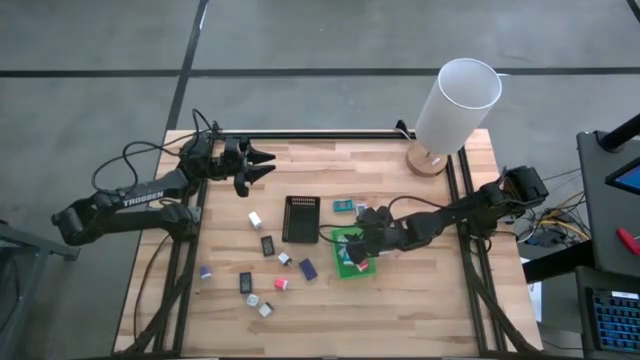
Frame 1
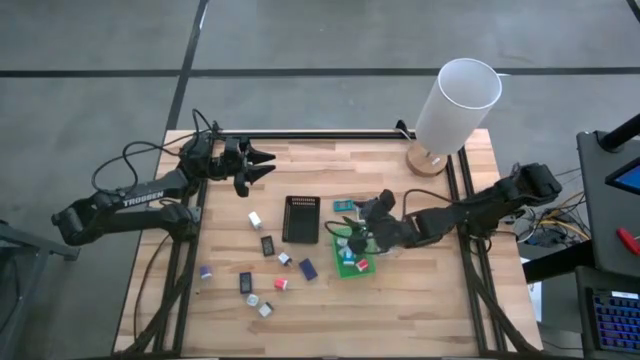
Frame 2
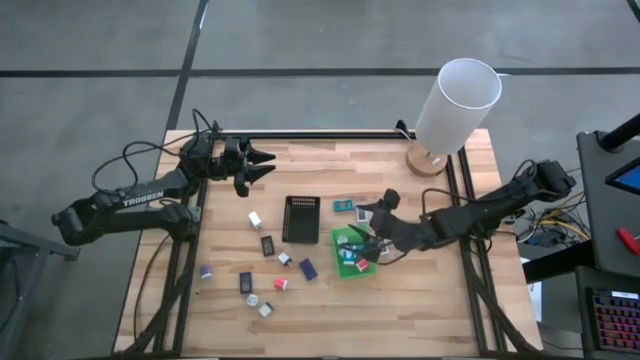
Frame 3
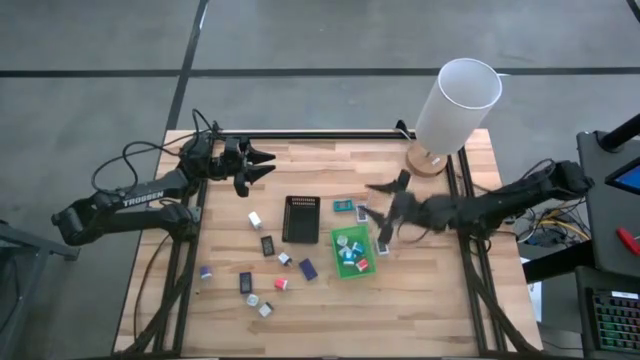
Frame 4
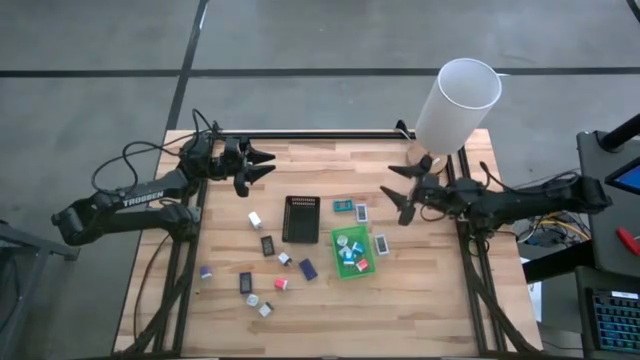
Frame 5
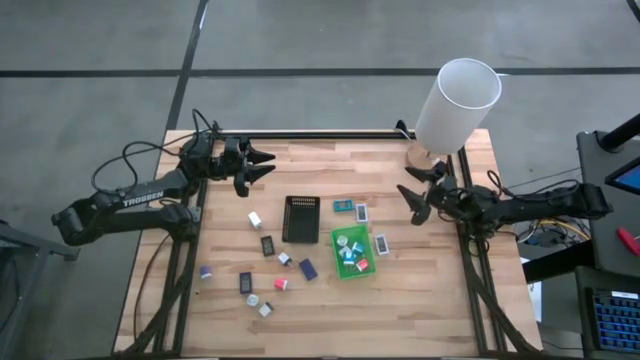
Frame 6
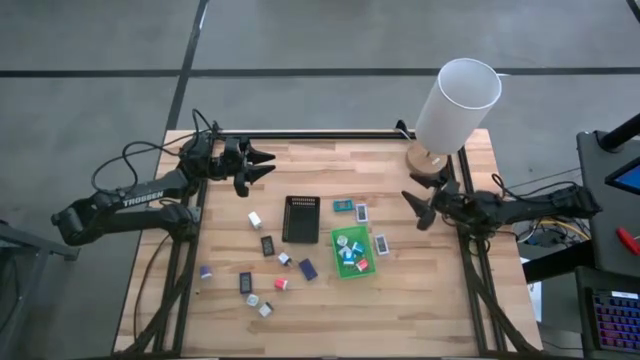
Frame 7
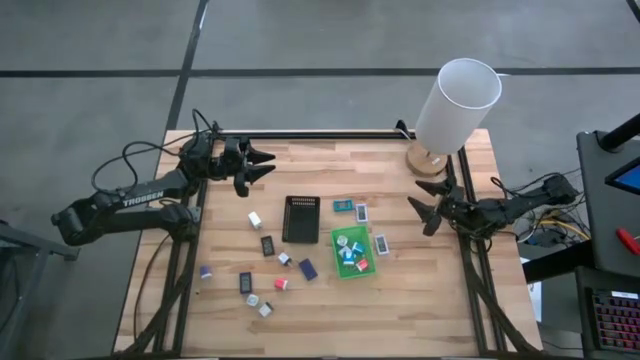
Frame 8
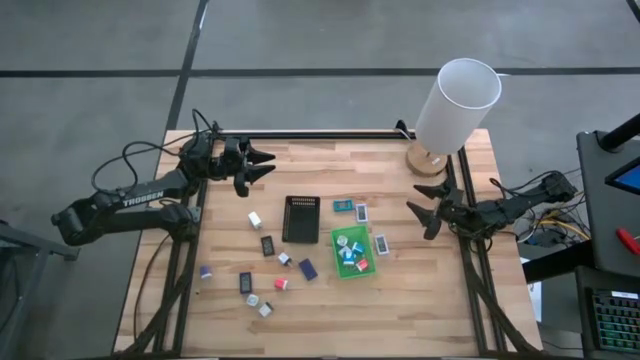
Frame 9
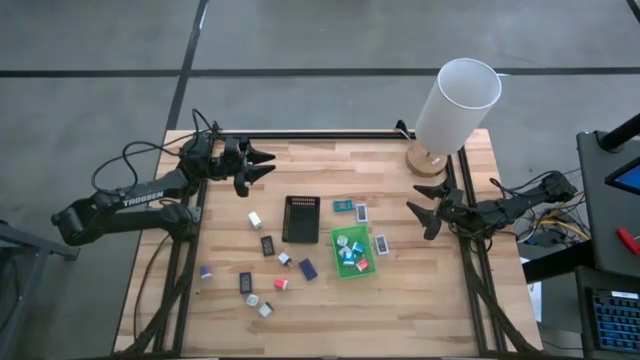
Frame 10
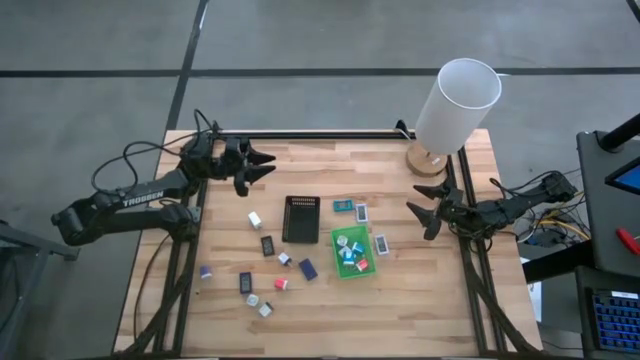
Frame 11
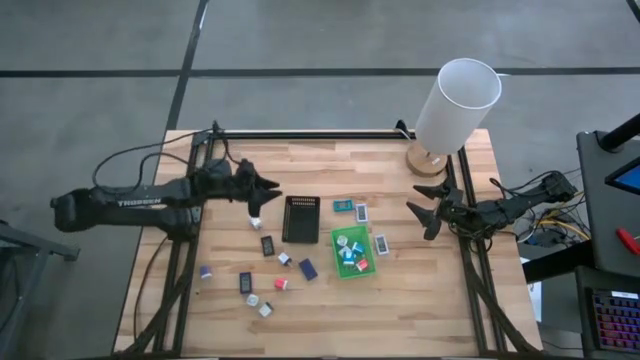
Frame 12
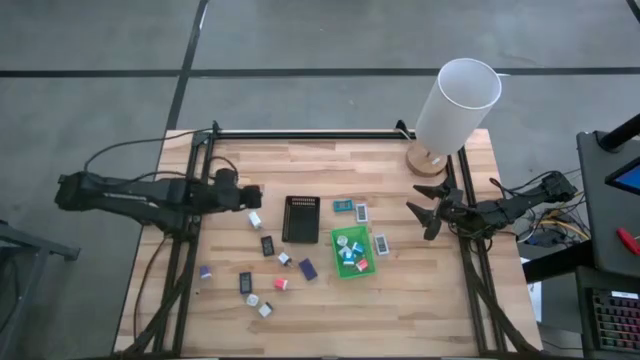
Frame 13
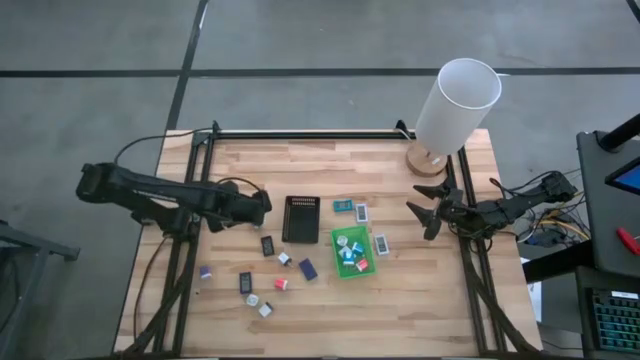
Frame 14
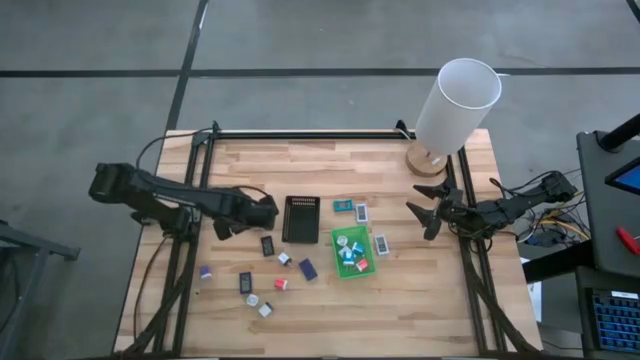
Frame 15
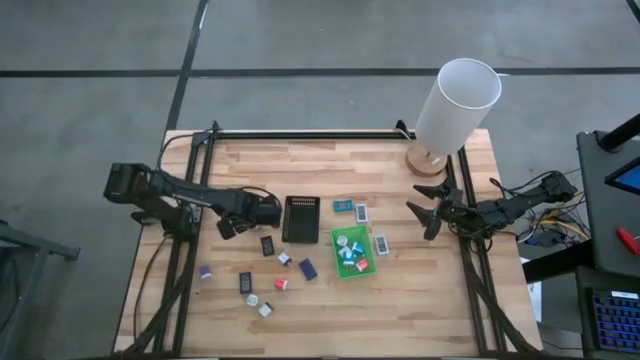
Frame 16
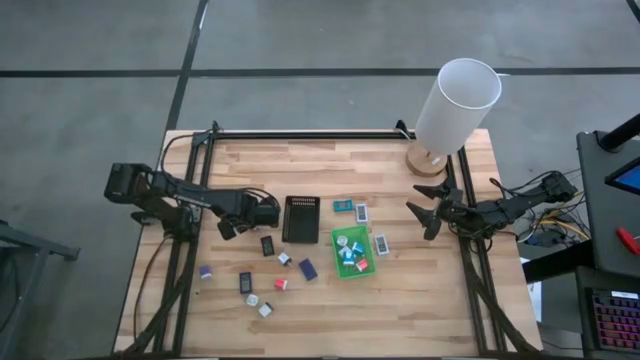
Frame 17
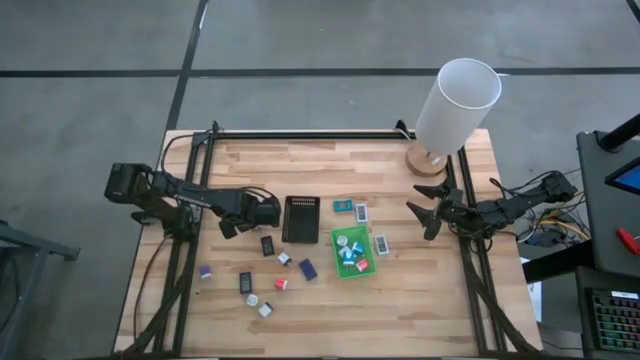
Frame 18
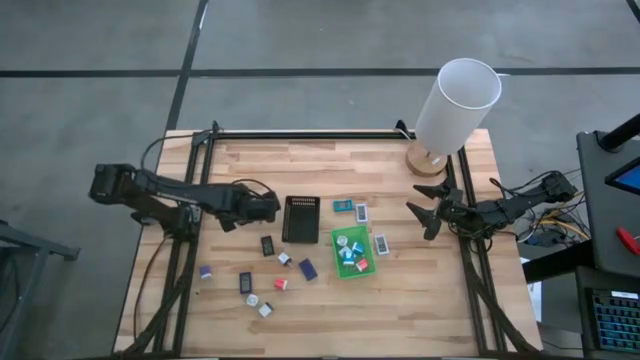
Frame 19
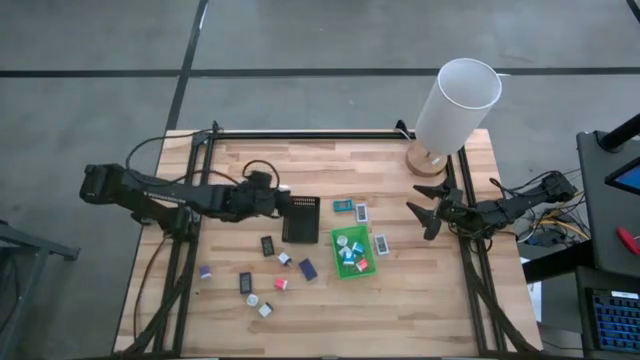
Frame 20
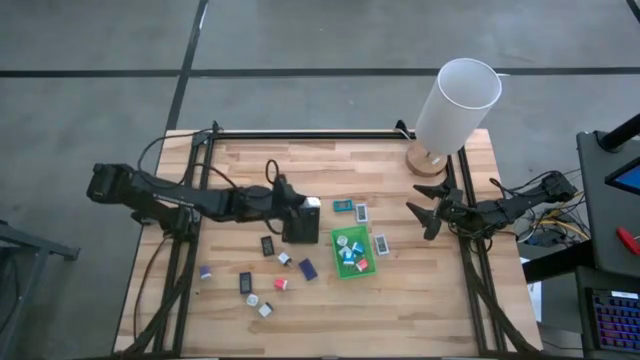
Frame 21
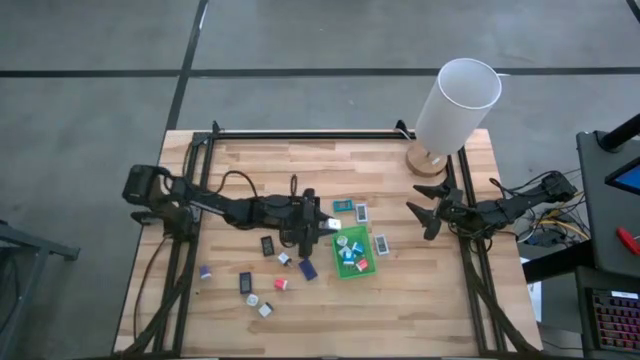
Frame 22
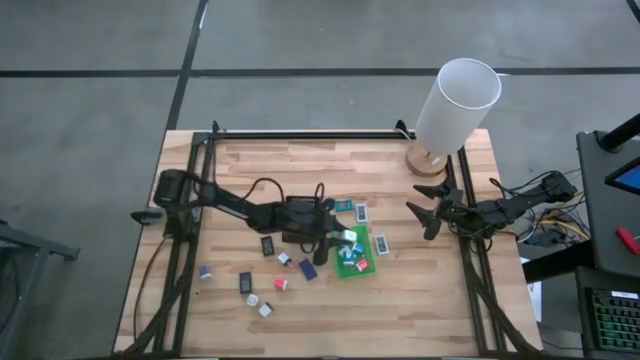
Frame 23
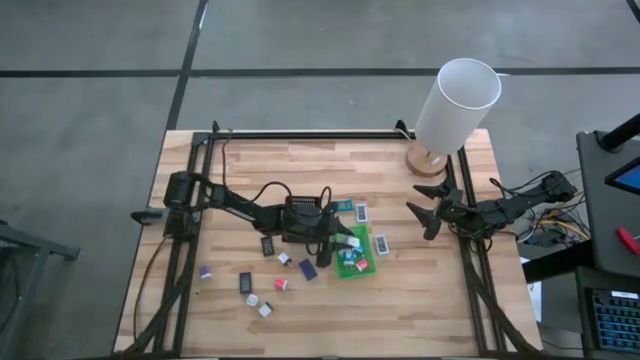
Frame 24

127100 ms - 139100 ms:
Task: Pick & Place Office items
Put the white charger adapter into the green bin

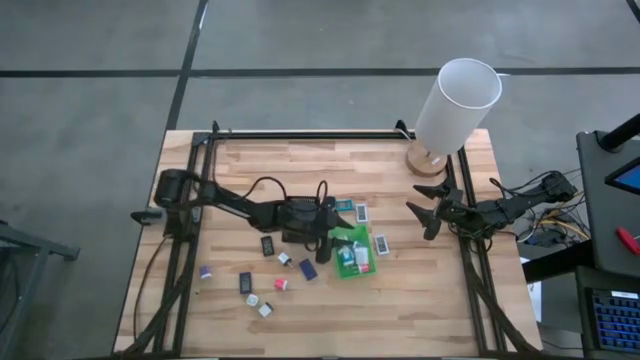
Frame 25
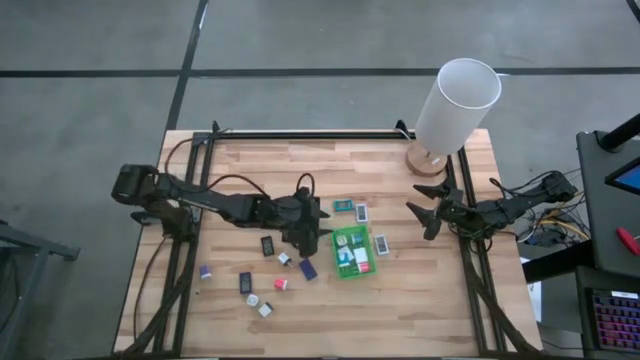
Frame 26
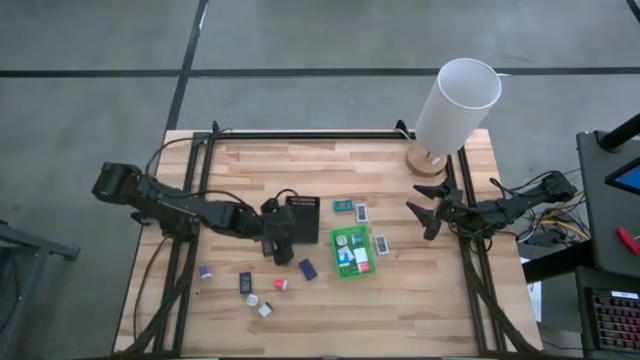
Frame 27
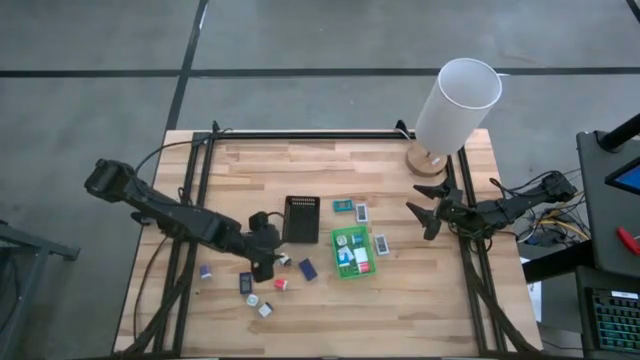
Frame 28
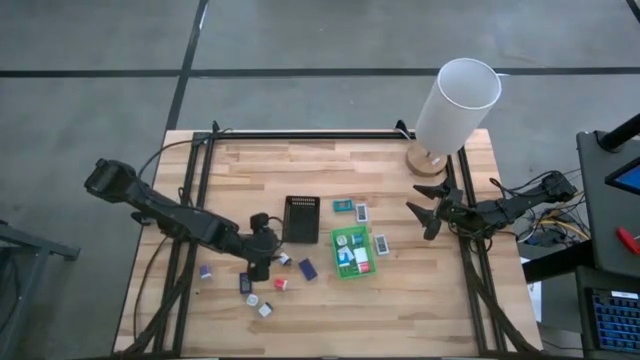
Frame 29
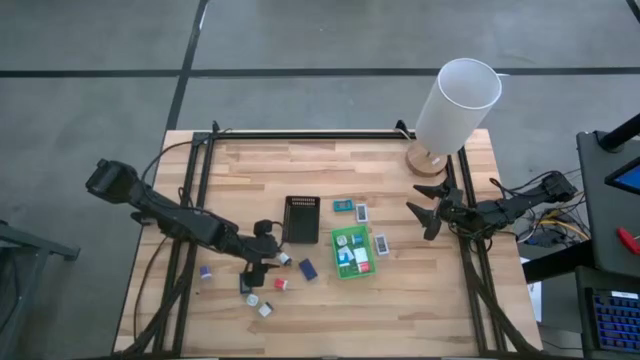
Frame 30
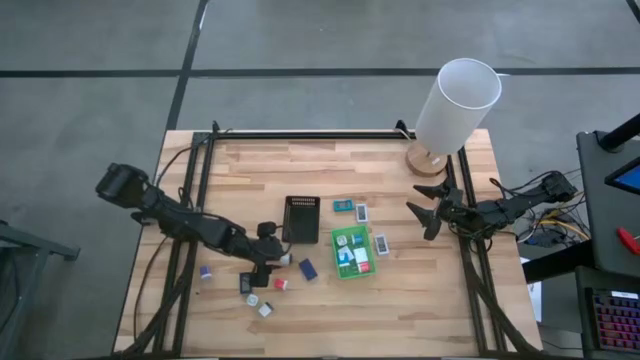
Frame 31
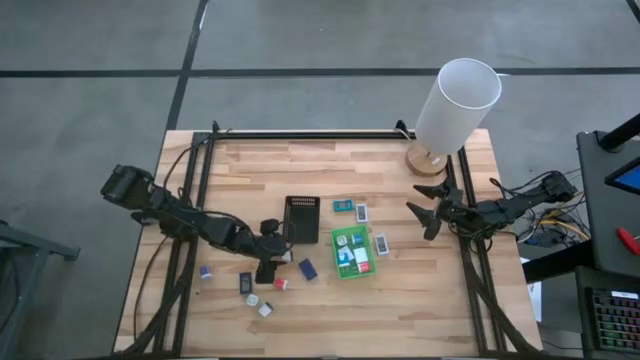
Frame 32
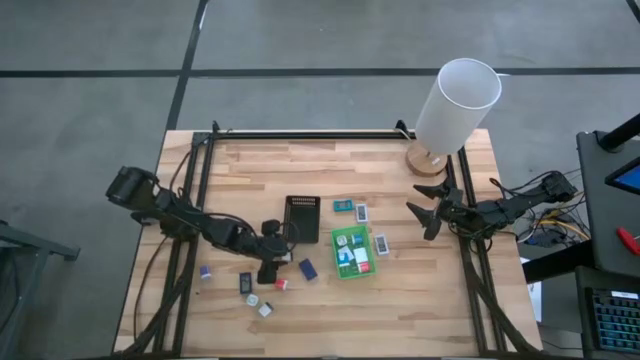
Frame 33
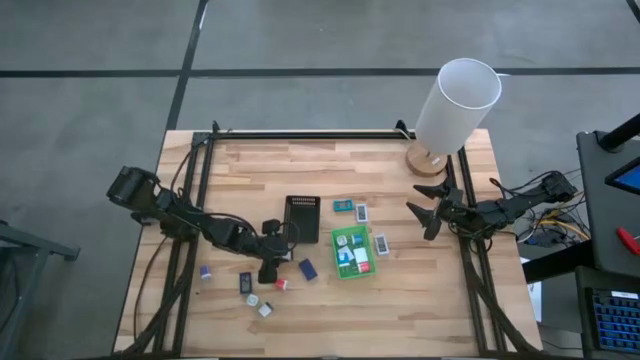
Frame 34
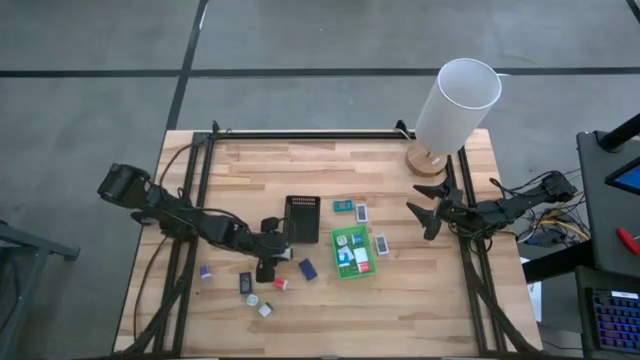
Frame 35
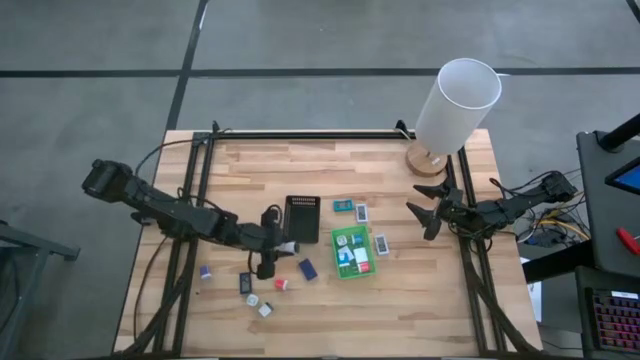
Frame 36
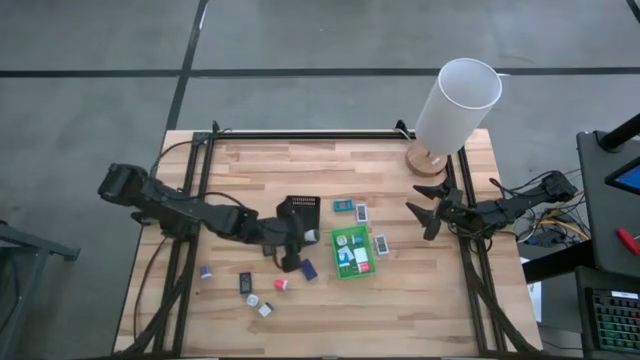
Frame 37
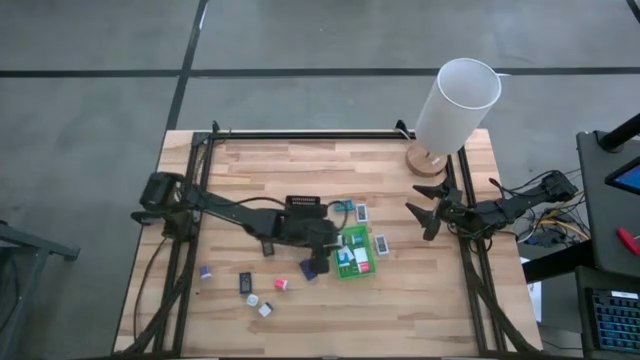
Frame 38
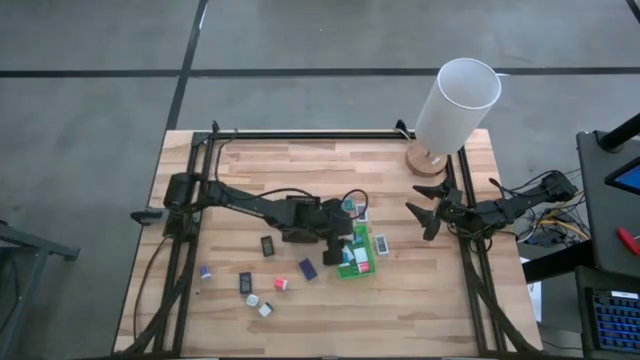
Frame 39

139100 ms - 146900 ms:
Put the top white black charger adapter into the green bin

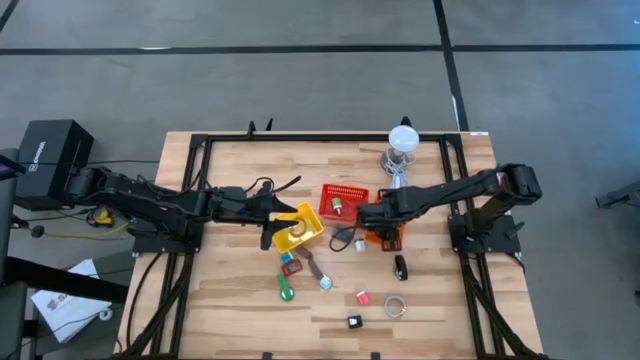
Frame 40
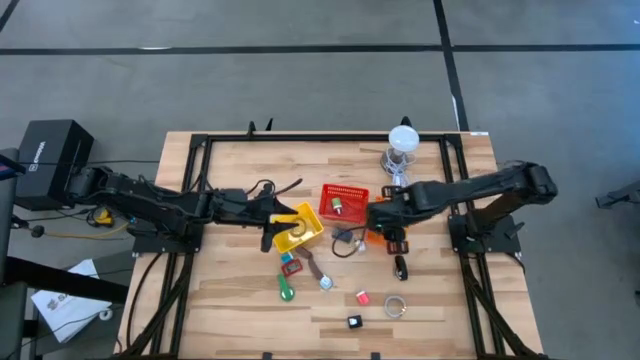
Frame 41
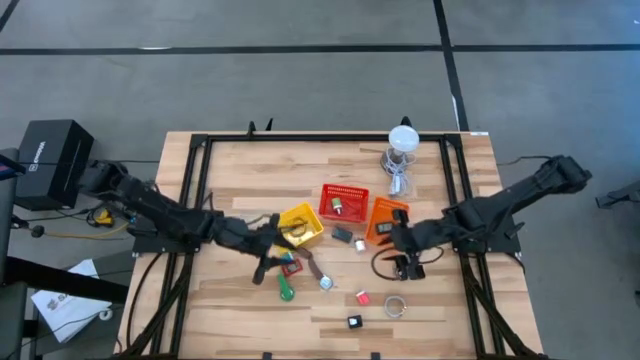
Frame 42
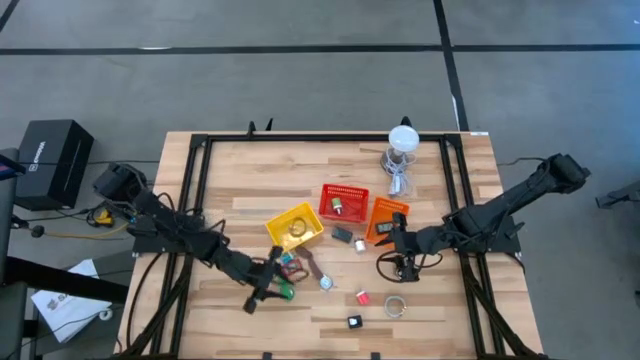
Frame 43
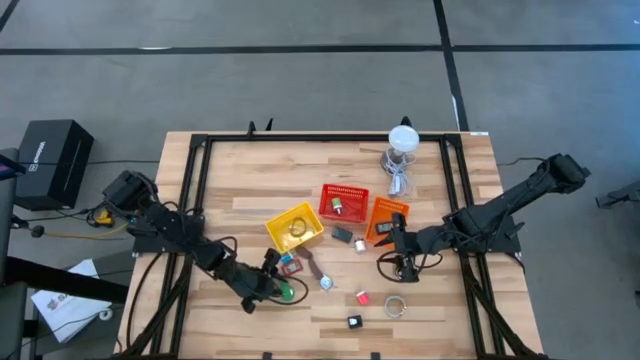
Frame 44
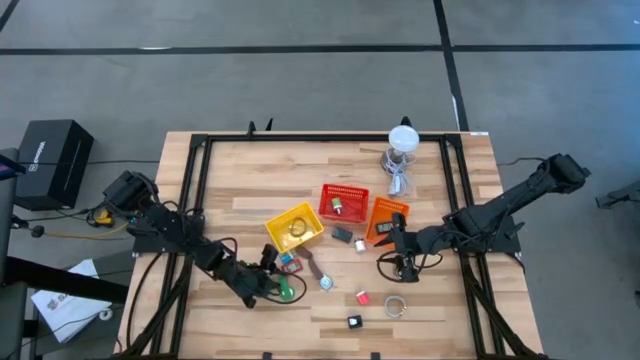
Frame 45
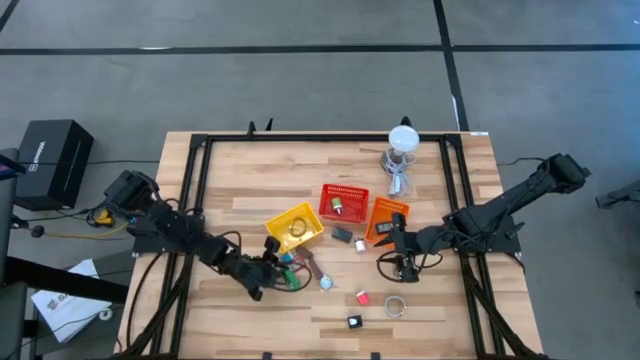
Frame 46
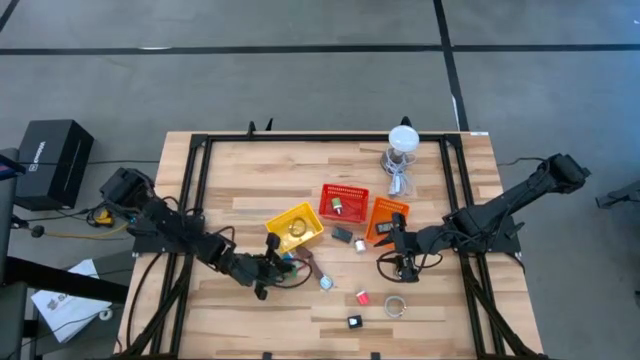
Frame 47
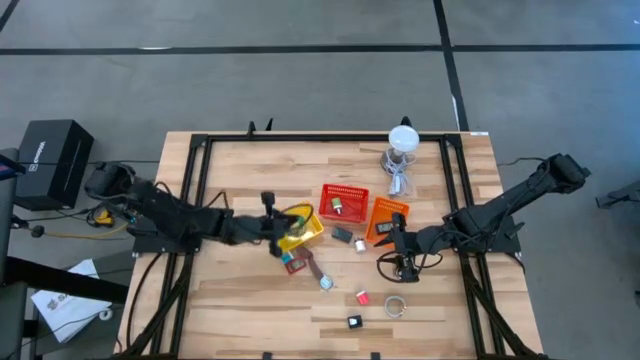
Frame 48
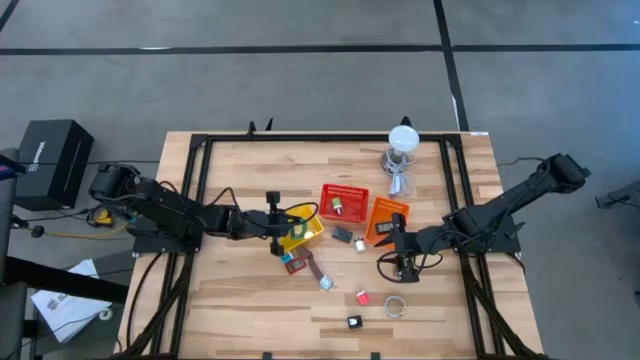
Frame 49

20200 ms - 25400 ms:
Task: Pick & Place Office items
Put the green watch into the yellow bin
